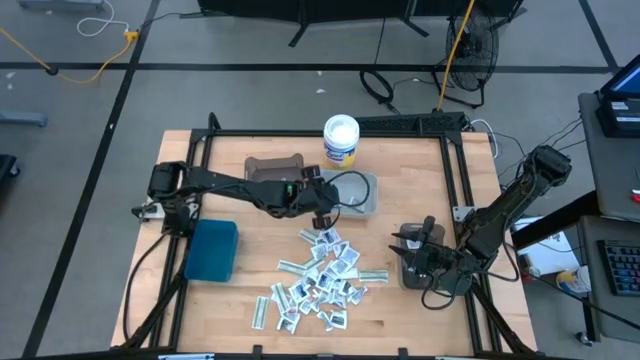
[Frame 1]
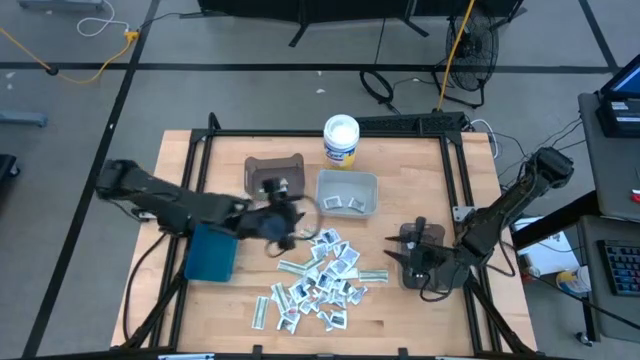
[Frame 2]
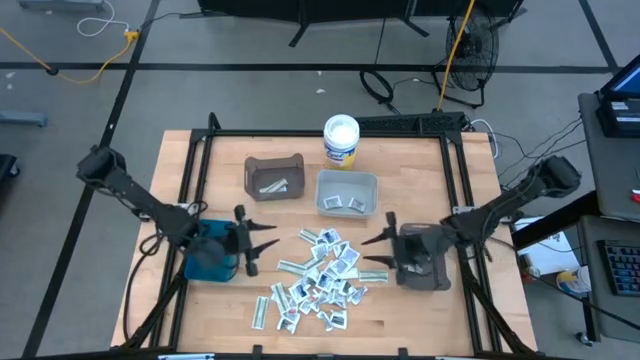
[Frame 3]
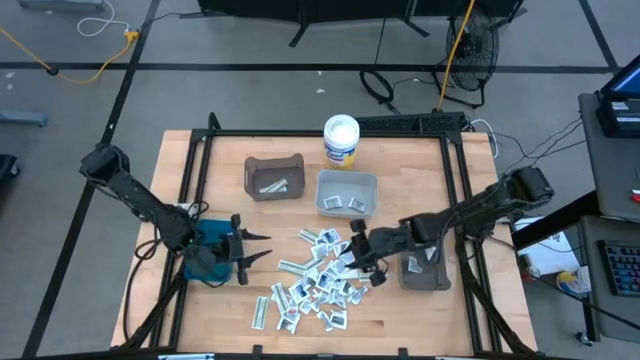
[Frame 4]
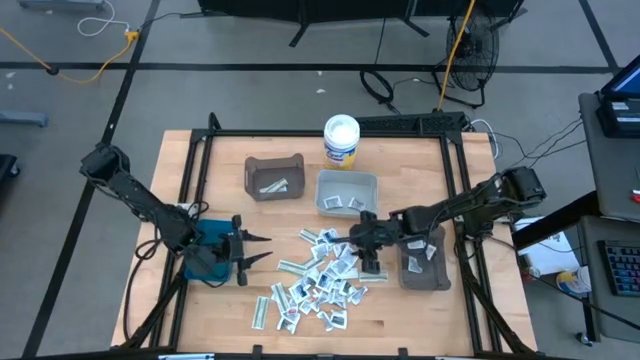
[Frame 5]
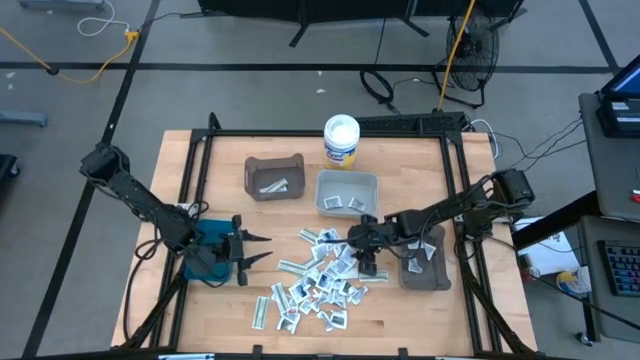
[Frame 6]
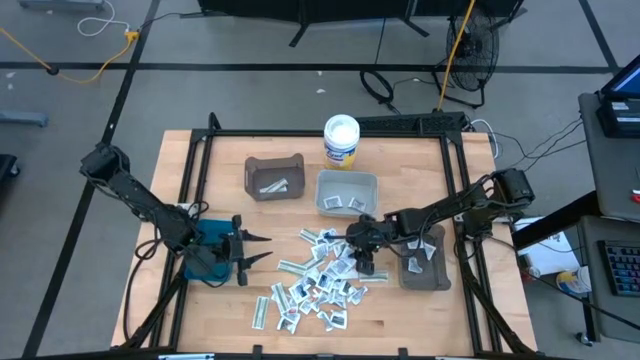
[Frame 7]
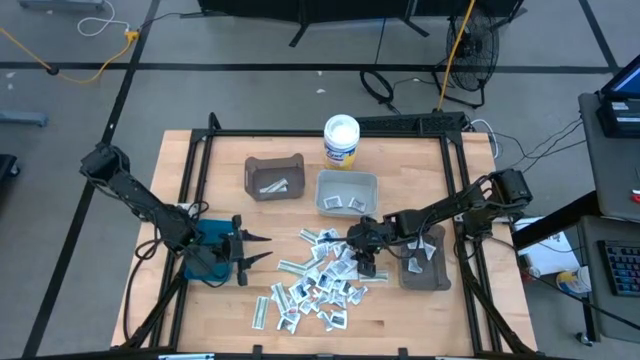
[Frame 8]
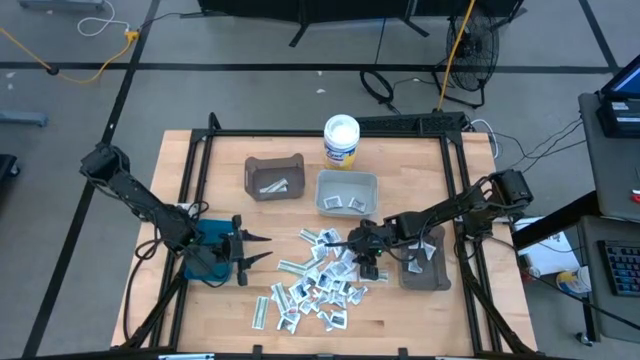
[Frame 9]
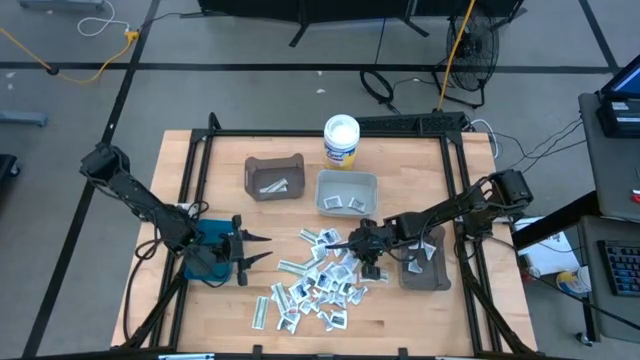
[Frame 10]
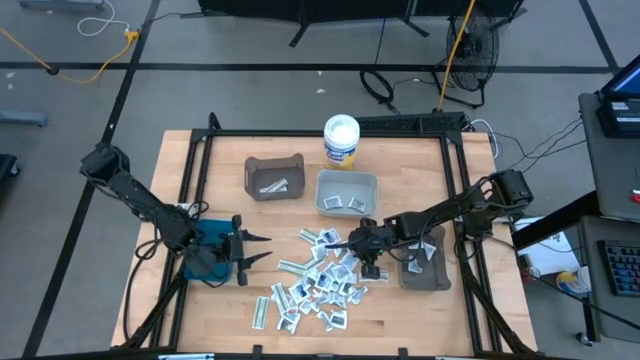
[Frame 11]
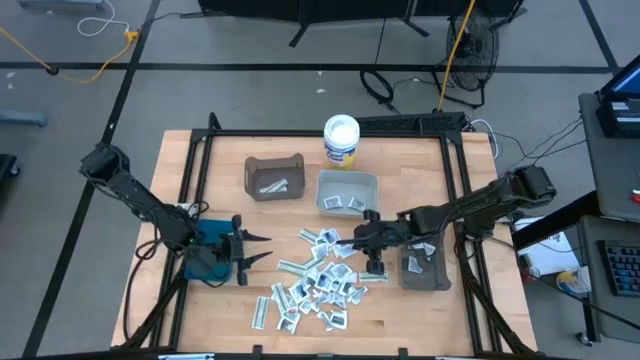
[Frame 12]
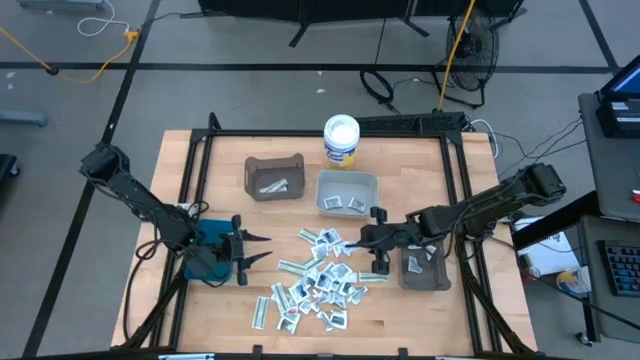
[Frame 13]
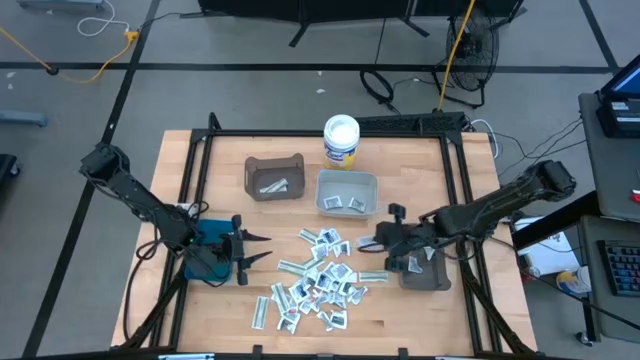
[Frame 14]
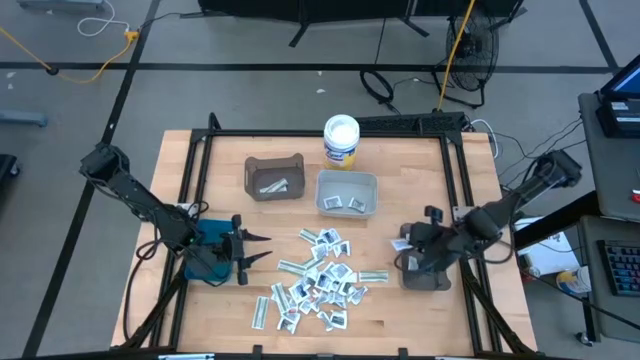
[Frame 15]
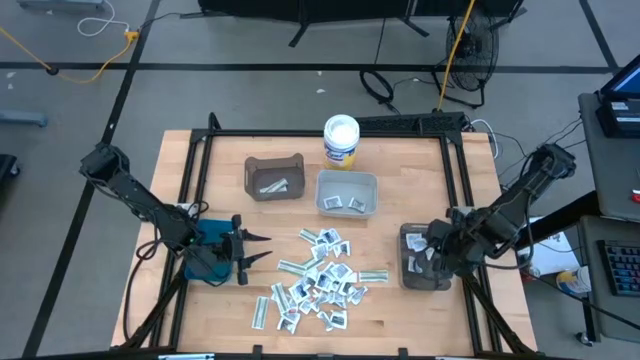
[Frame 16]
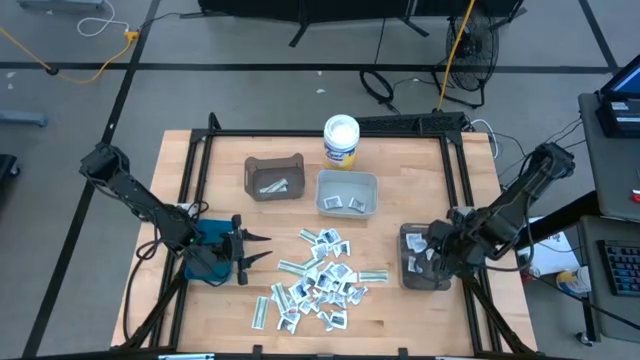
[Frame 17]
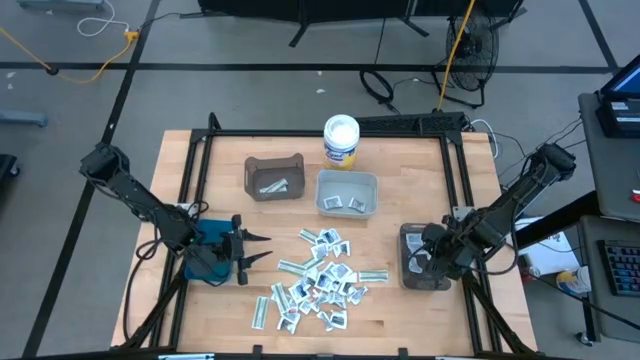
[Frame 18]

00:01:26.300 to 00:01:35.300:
Task: Pick & Place First Aid Supplies
Put the blue alcohol pad into the bottom black bin

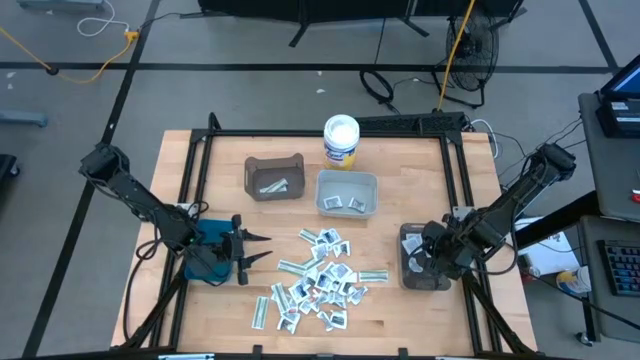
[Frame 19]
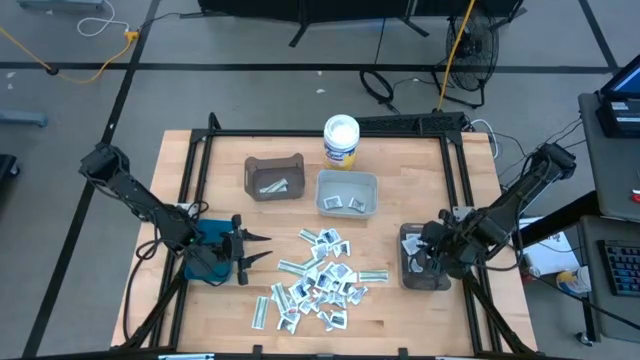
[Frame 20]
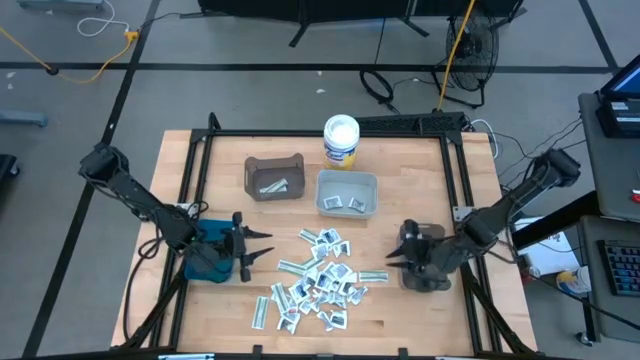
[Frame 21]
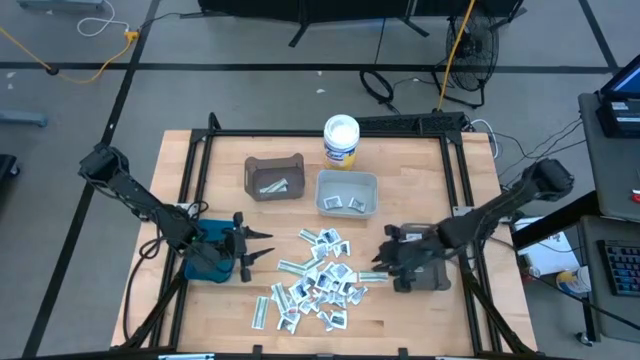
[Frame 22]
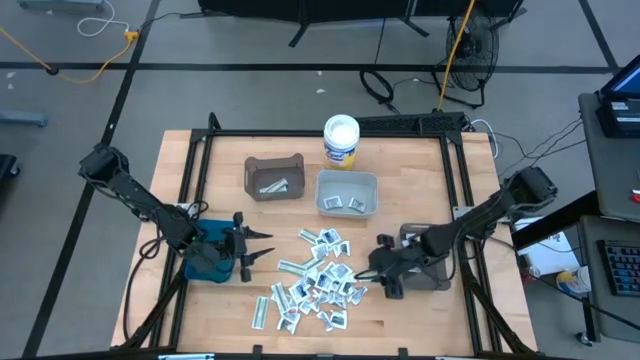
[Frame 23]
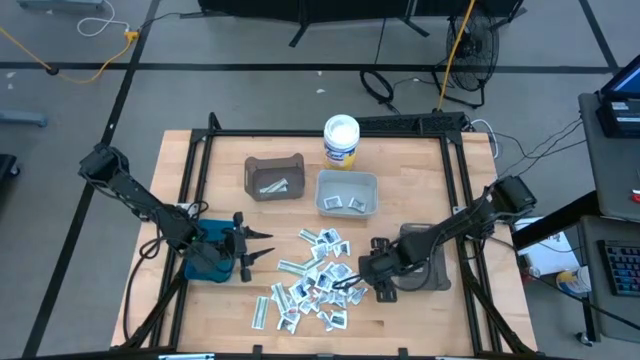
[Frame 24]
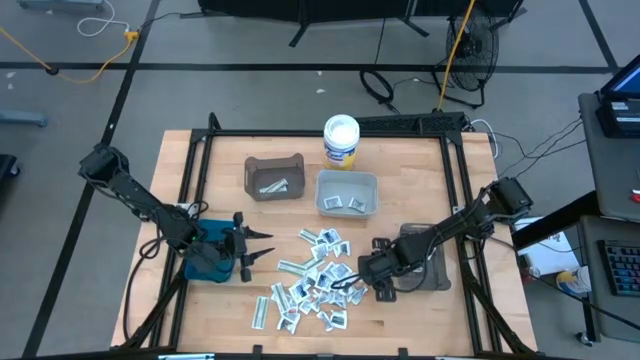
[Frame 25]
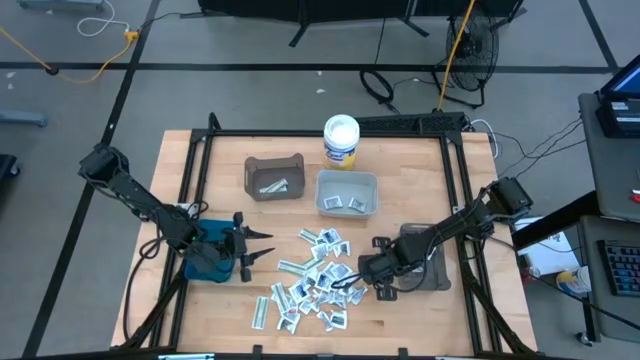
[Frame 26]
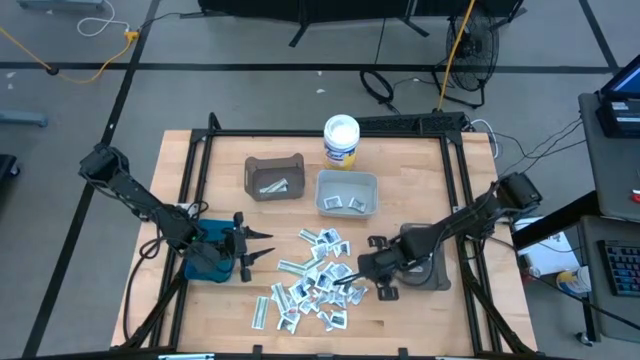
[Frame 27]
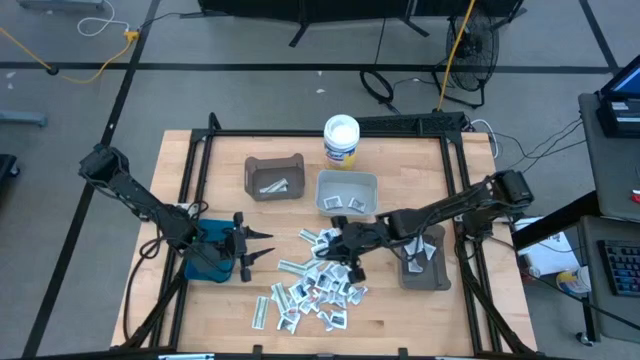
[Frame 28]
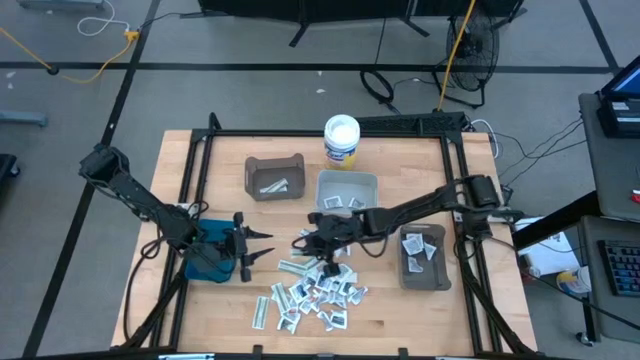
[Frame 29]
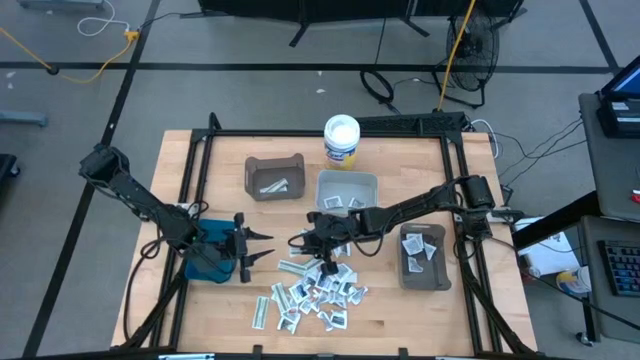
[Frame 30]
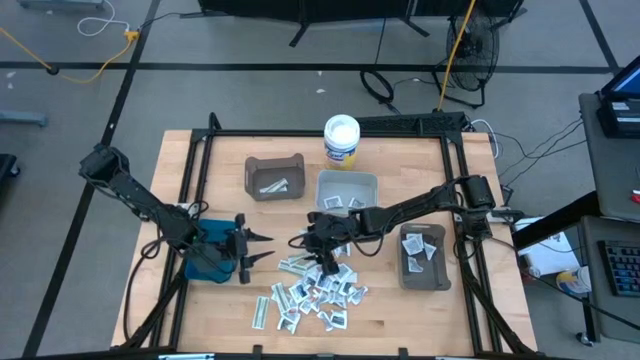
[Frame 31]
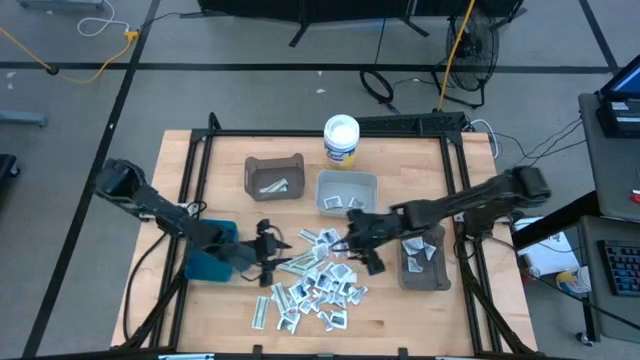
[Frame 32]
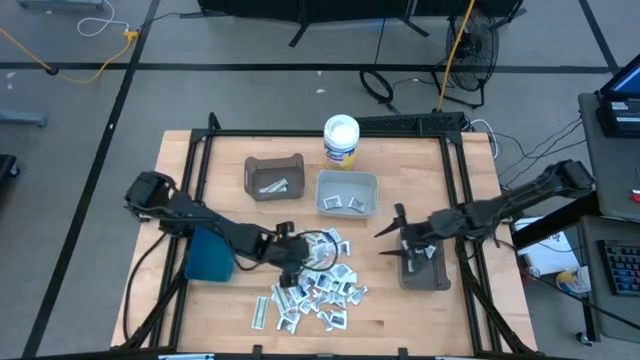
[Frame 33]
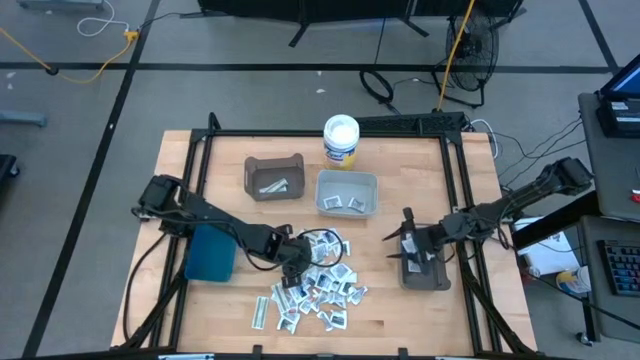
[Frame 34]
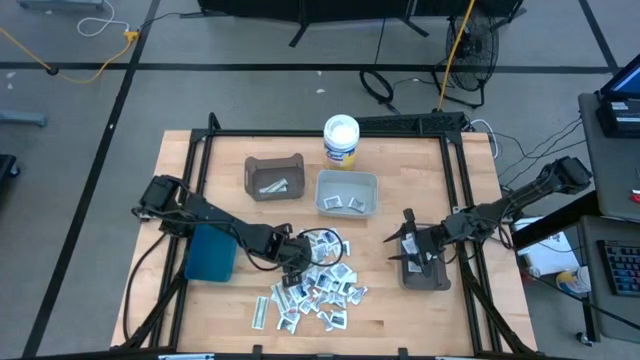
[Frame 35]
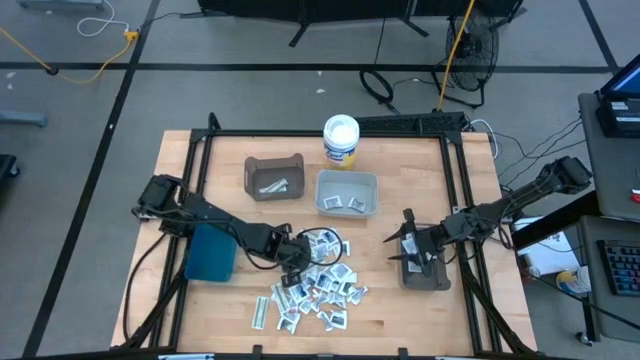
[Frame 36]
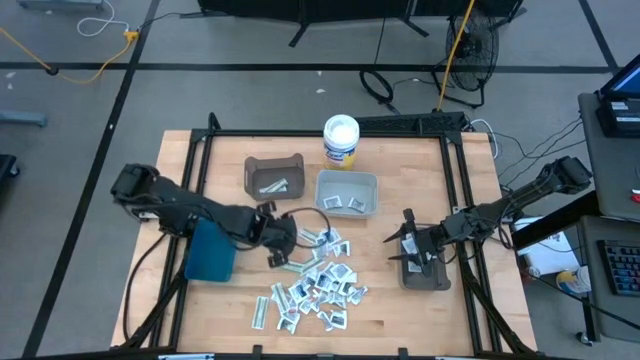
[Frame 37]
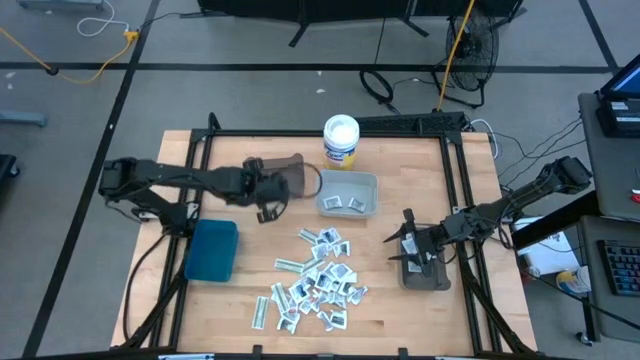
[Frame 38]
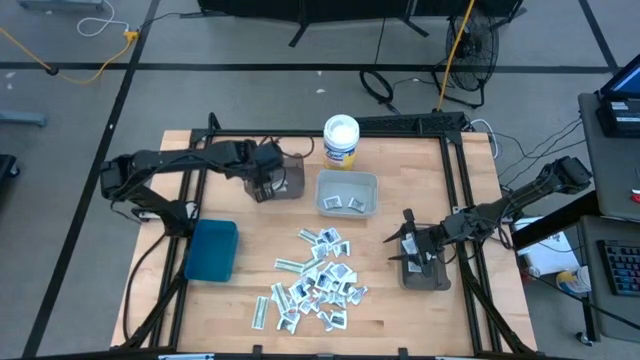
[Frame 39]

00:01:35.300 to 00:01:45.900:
Put the green bandage pack into the top black bin

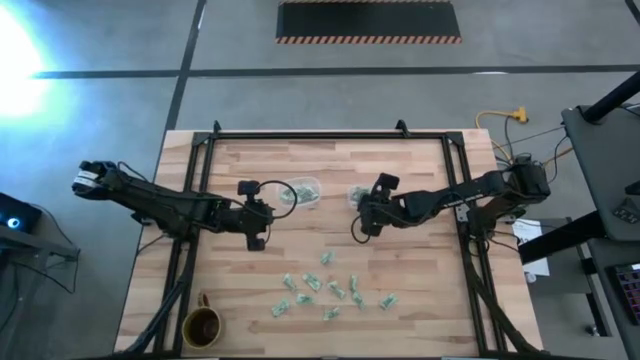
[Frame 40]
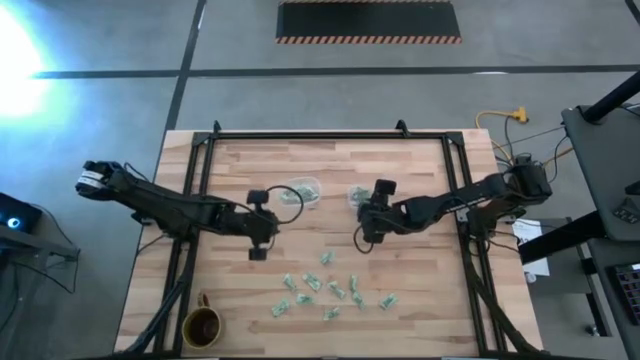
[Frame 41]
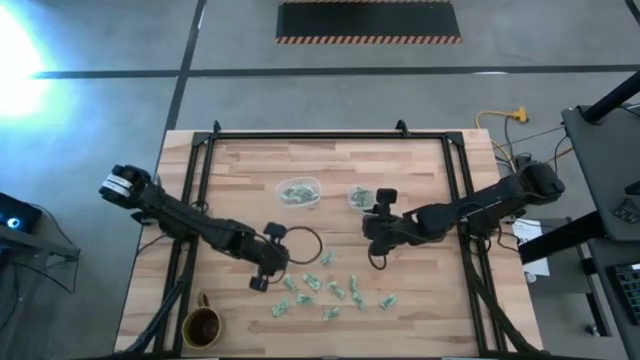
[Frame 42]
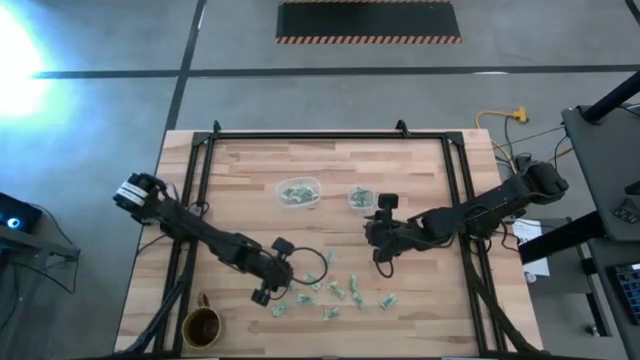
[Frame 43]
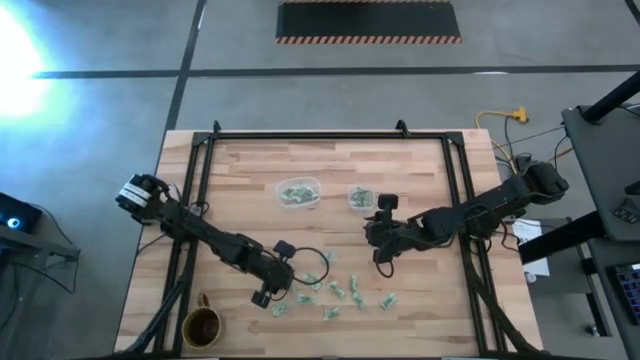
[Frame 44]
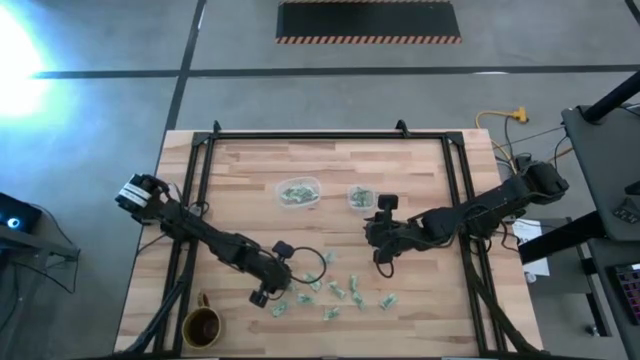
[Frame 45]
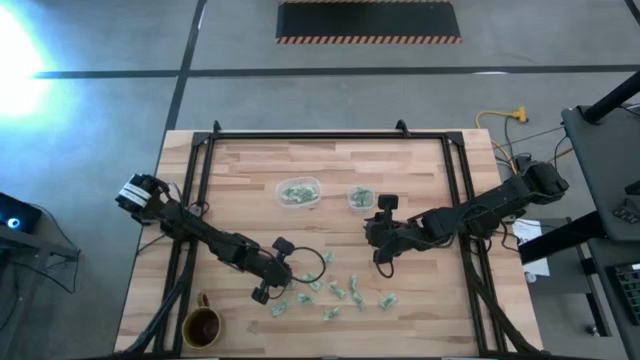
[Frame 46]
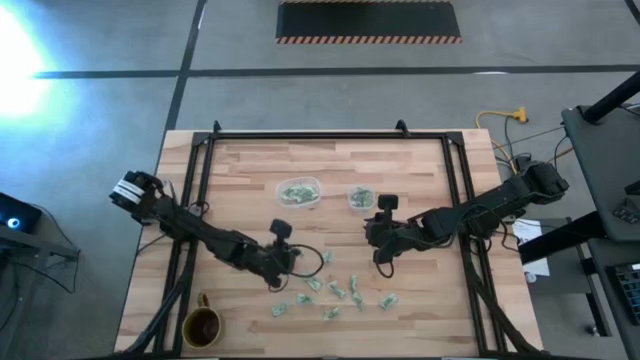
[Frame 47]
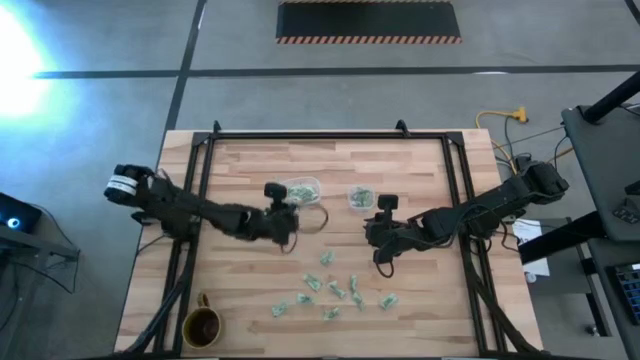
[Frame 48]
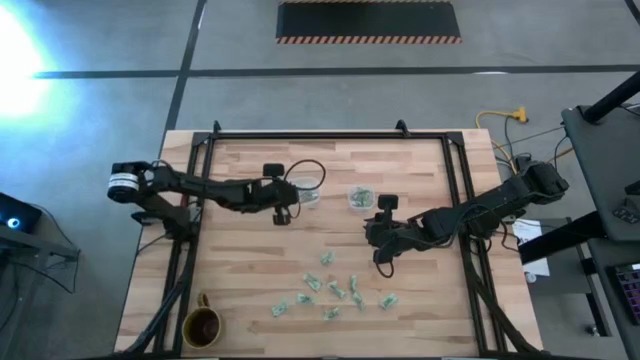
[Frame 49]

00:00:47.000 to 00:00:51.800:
Task: Pick and place Stevia / Truvia into bins
Put the stevia packet into the transparent oval container
